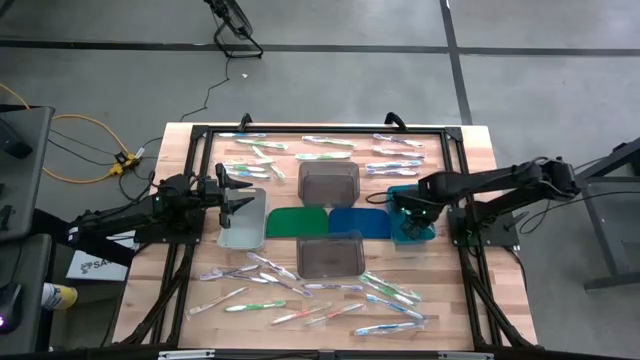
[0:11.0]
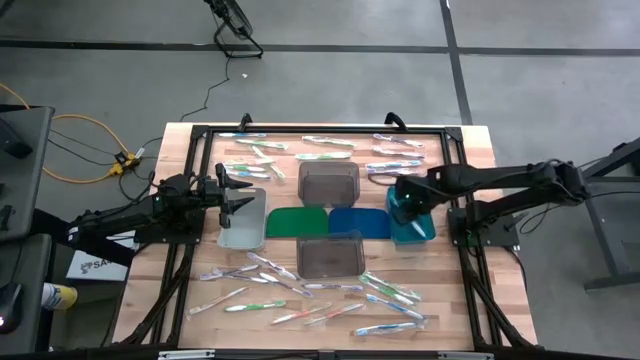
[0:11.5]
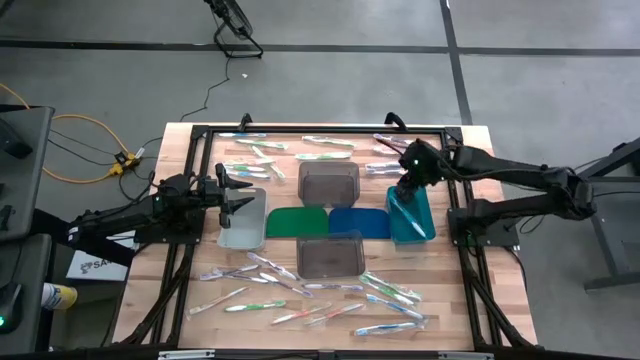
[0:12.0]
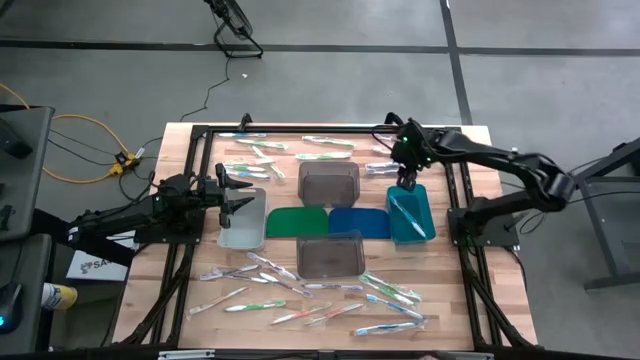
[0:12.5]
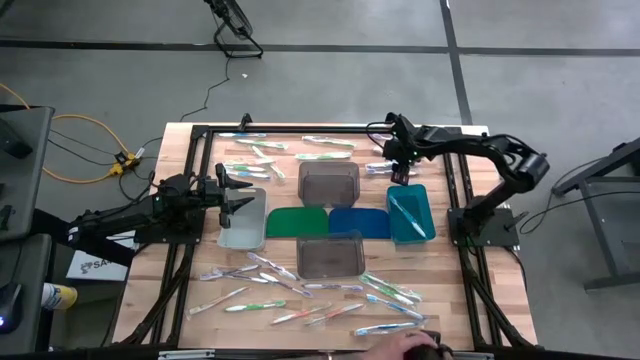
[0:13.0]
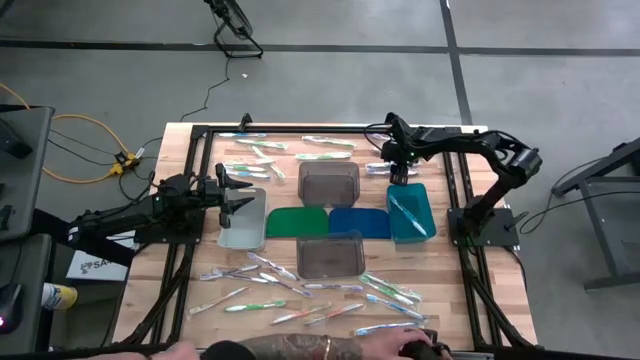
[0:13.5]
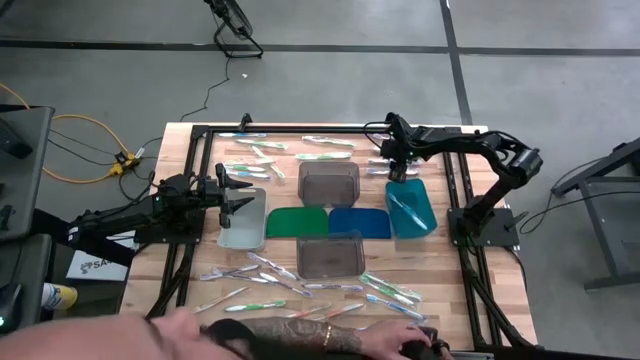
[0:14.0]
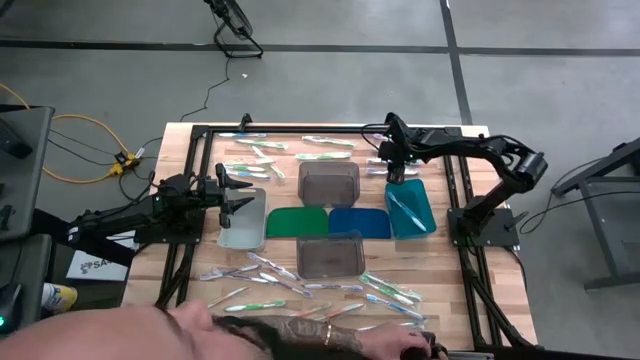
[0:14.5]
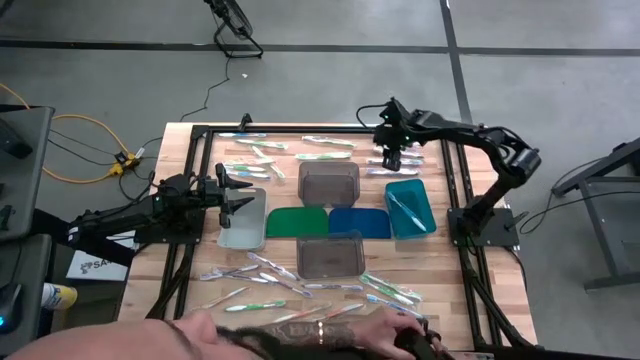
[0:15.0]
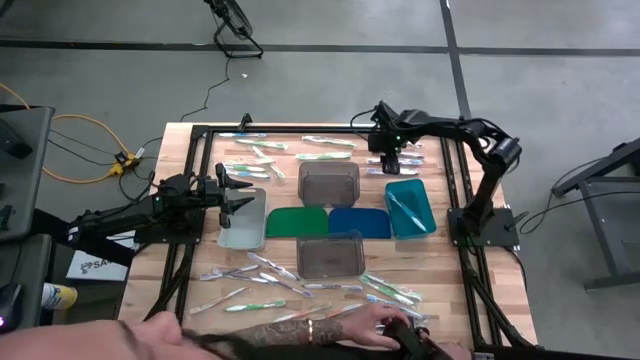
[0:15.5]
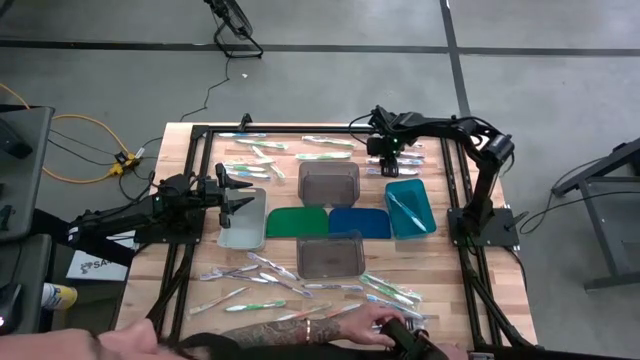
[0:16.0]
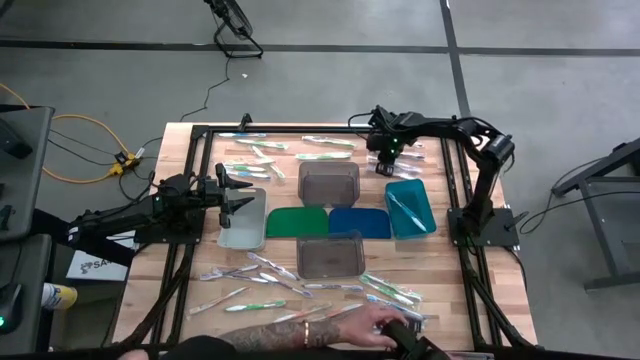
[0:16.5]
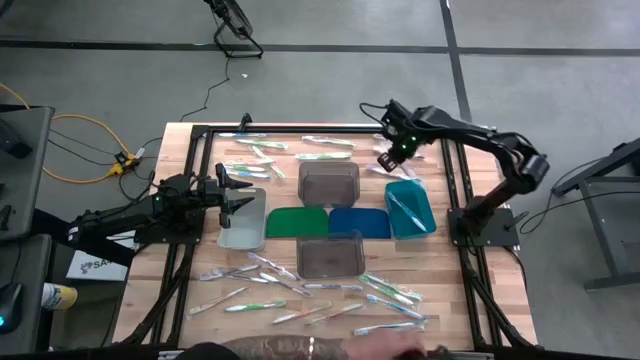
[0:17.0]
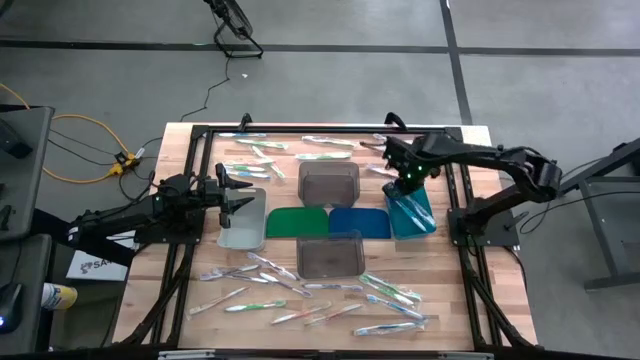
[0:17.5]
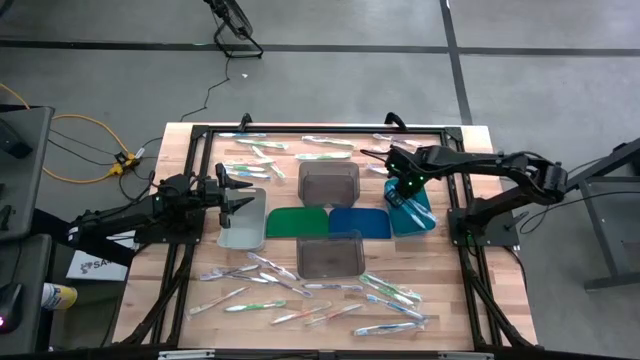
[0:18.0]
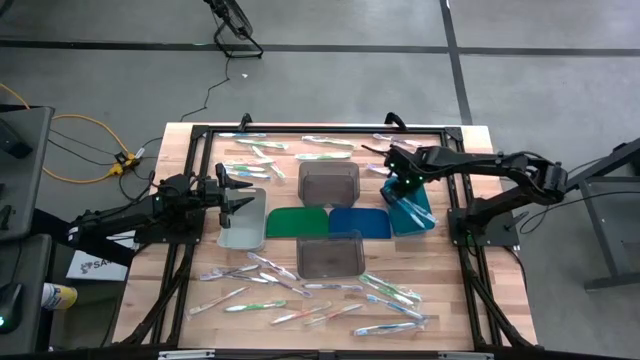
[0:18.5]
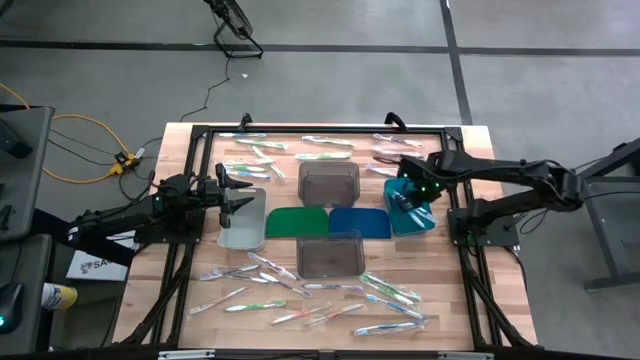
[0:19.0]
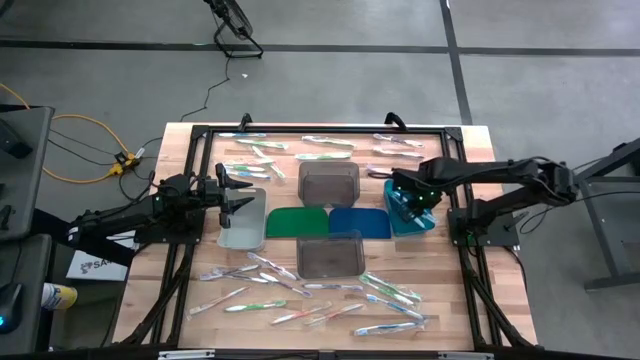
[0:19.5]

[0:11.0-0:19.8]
Task: Pick & Place Toothbrushes
Put the blue toothbrush into the blue bin

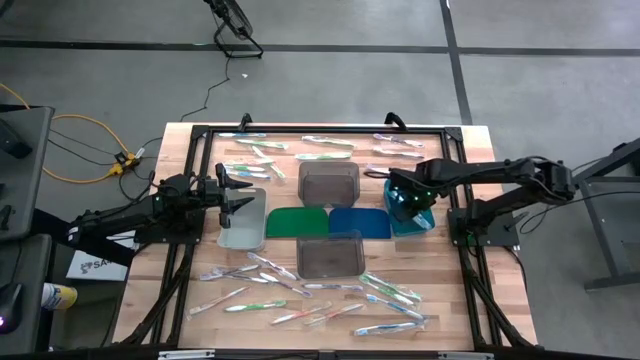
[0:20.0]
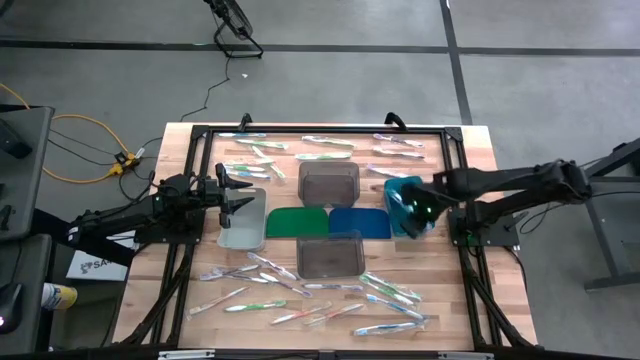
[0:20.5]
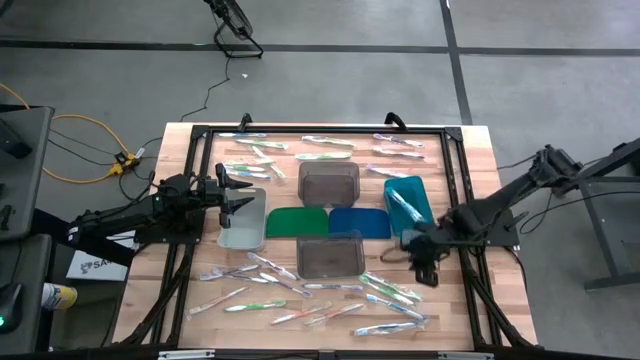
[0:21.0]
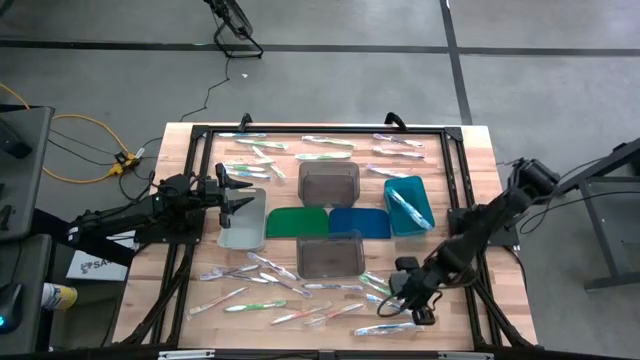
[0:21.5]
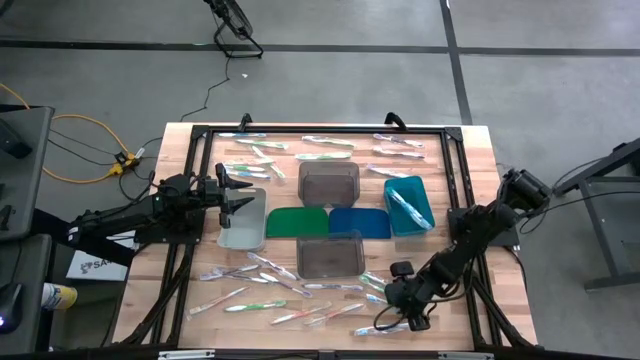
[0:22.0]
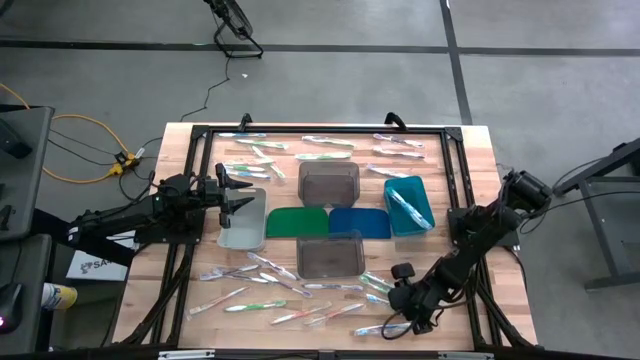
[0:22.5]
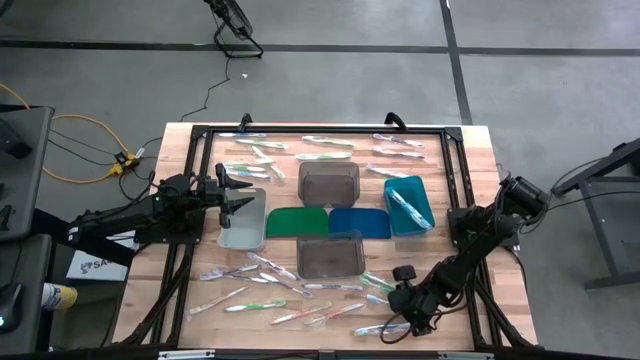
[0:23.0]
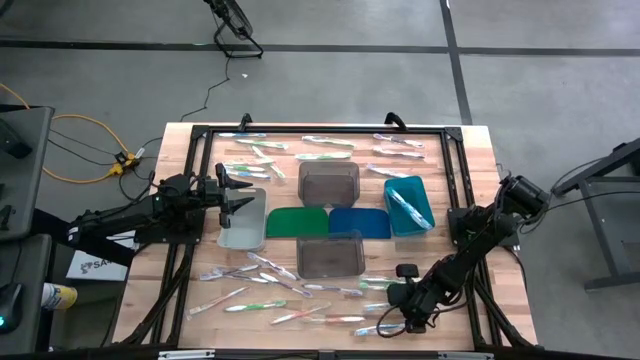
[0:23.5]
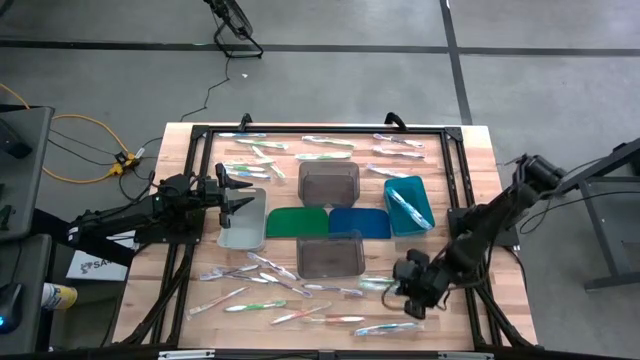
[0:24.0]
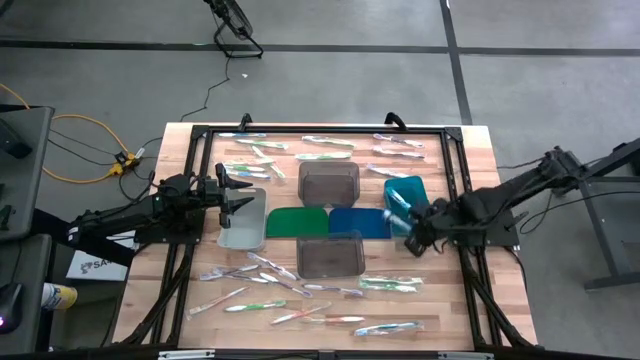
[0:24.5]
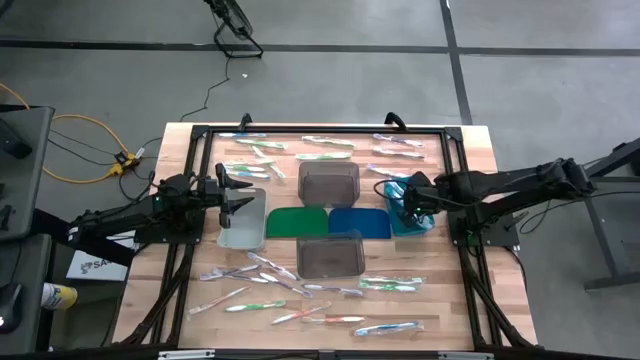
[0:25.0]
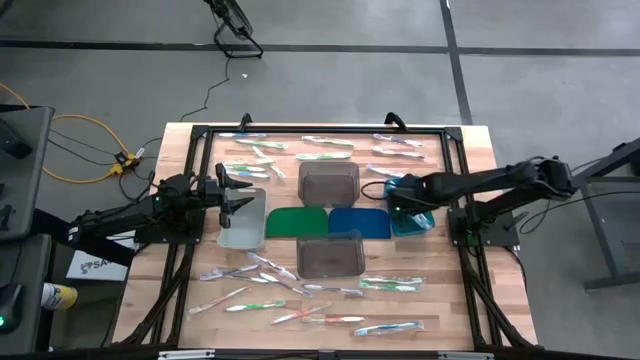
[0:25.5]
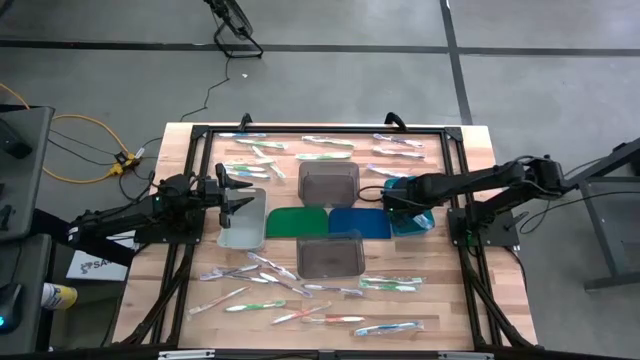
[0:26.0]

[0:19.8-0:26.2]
Put the blue toothbrush into the blue bin

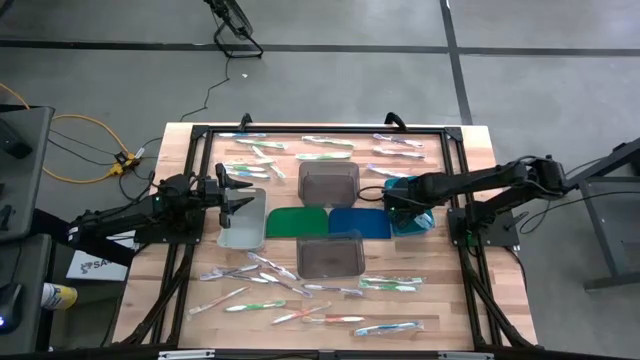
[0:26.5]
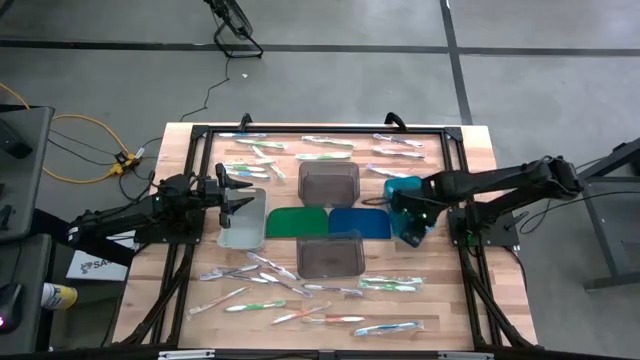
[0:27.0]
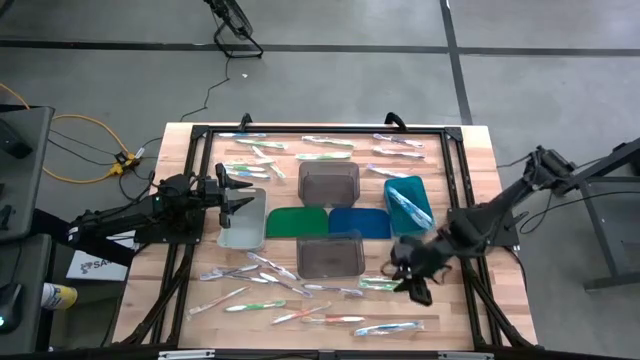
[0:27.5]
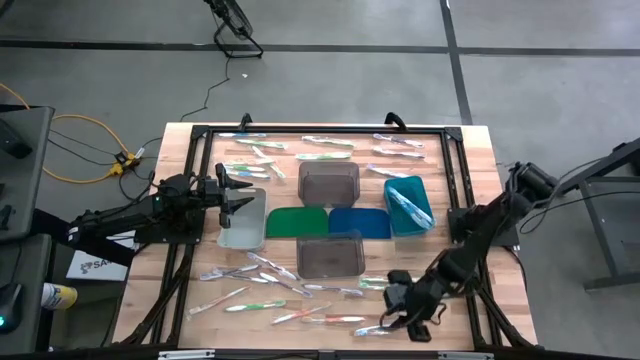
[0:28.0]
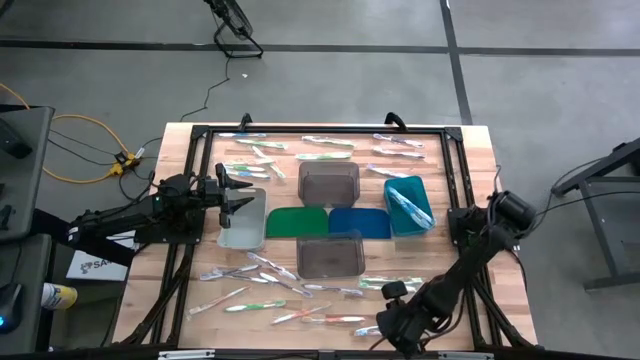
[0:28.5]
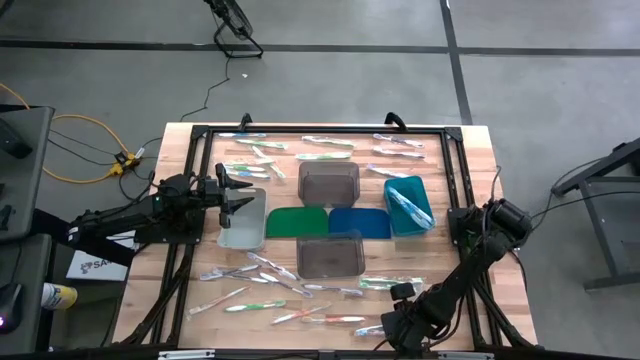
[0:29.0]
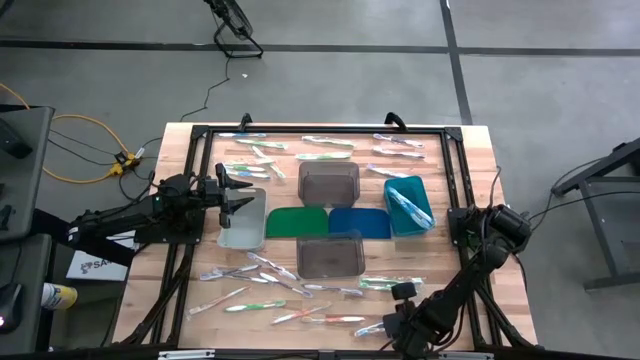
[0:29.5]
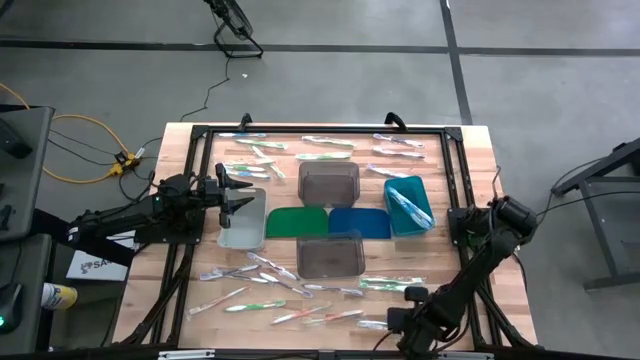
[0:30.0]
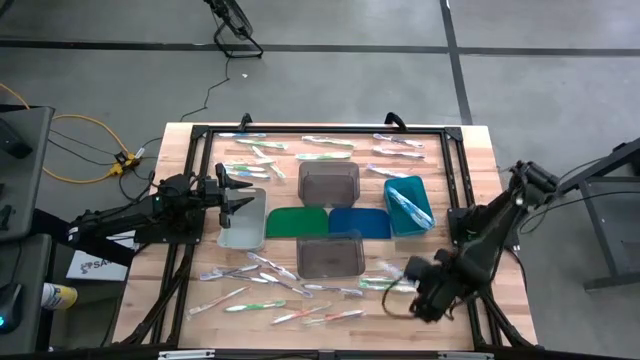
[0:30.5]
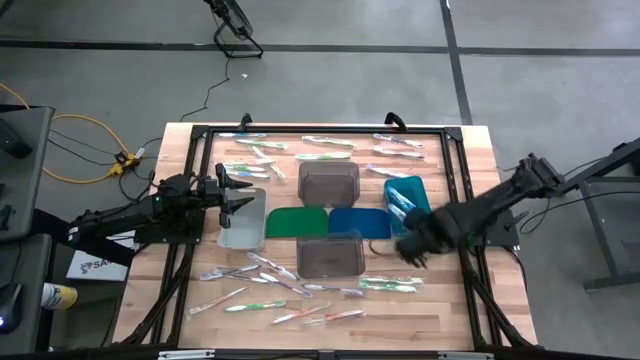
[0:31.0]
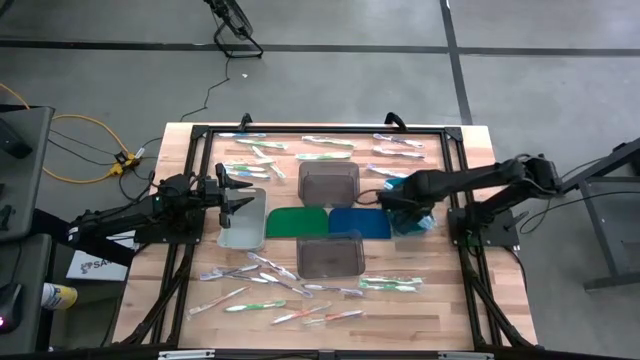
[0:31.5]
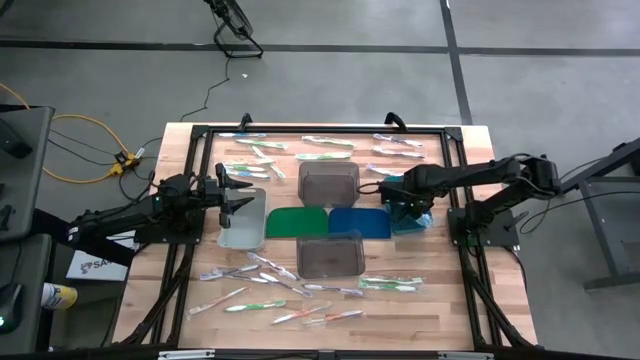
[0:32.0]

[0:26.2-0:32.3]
Put the blue toothbrush into the blue bin
